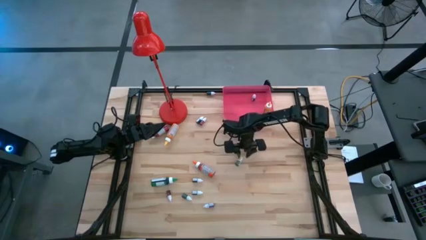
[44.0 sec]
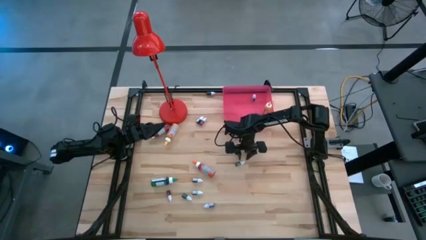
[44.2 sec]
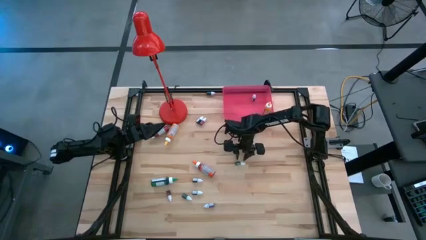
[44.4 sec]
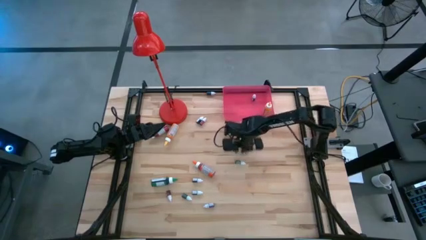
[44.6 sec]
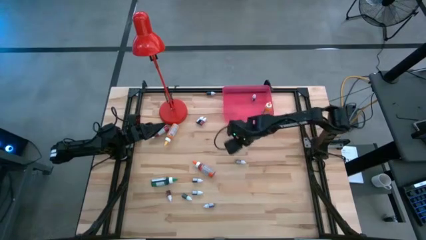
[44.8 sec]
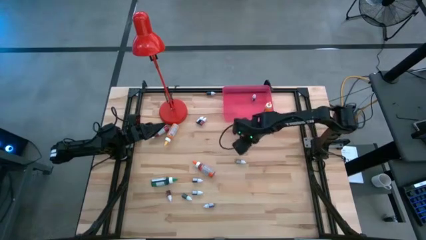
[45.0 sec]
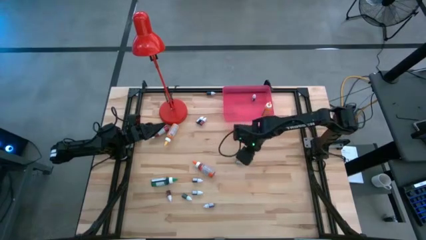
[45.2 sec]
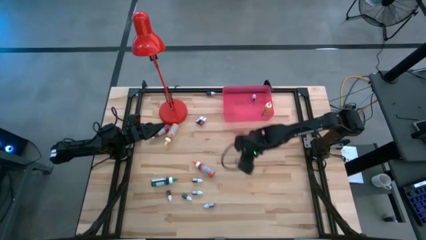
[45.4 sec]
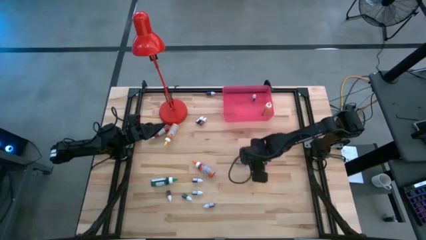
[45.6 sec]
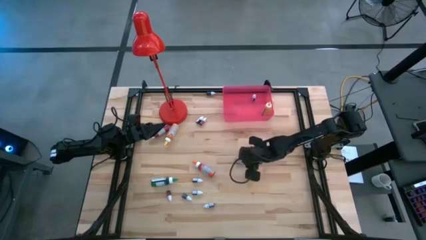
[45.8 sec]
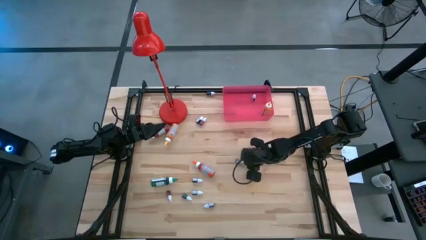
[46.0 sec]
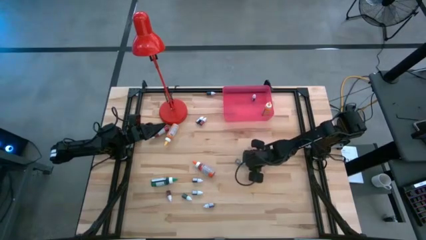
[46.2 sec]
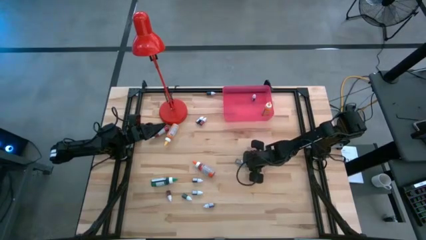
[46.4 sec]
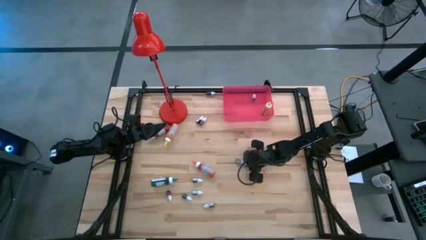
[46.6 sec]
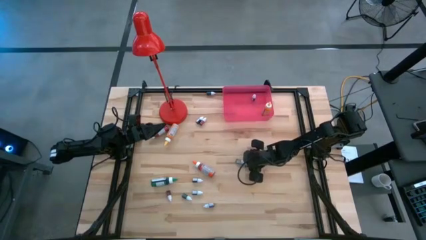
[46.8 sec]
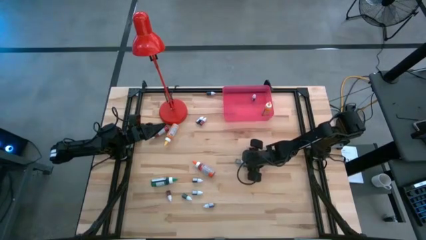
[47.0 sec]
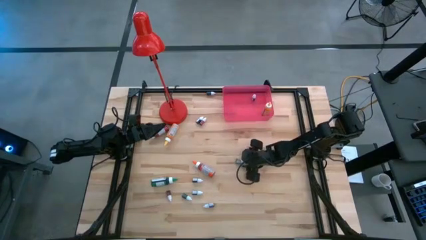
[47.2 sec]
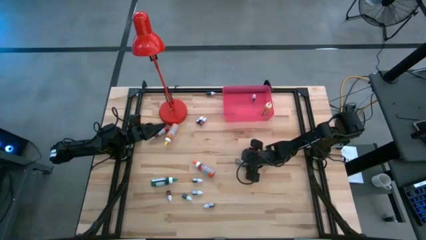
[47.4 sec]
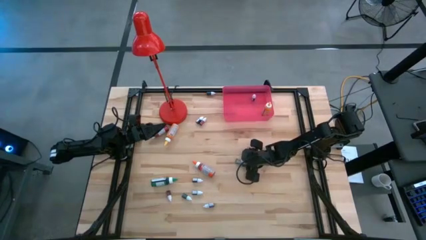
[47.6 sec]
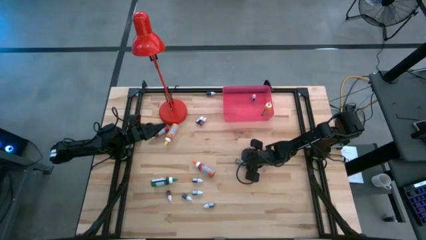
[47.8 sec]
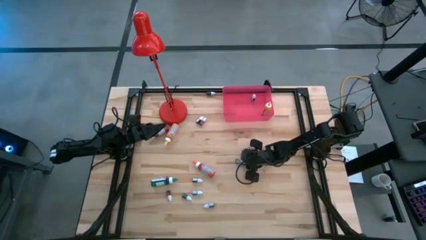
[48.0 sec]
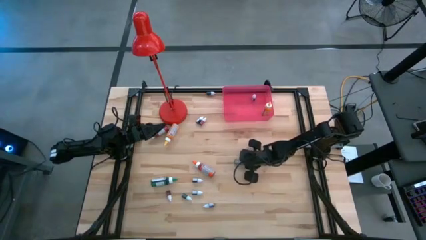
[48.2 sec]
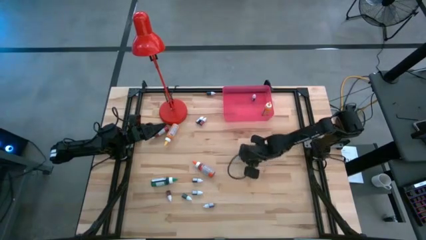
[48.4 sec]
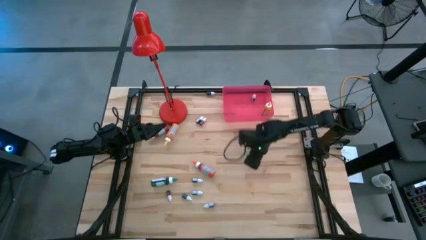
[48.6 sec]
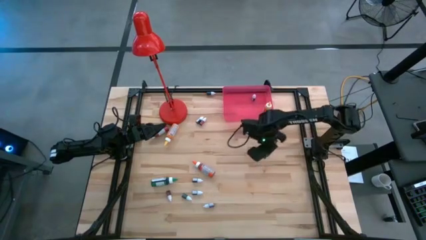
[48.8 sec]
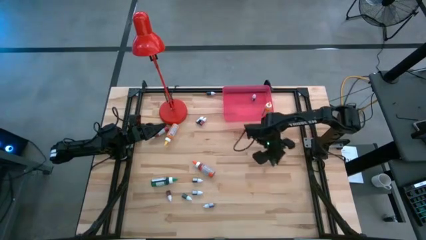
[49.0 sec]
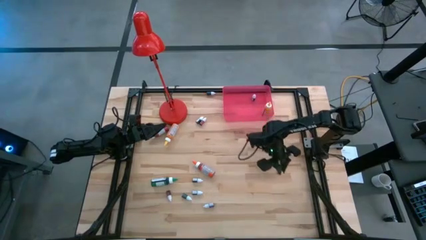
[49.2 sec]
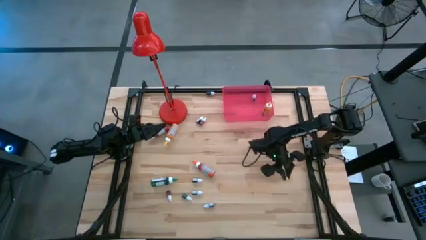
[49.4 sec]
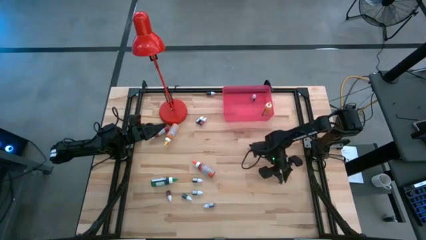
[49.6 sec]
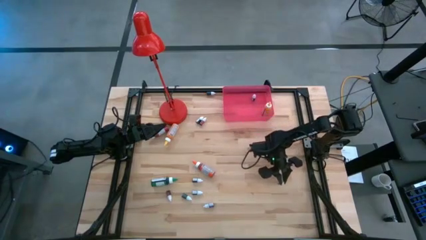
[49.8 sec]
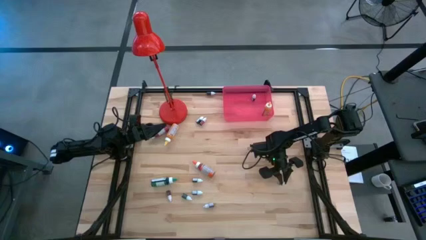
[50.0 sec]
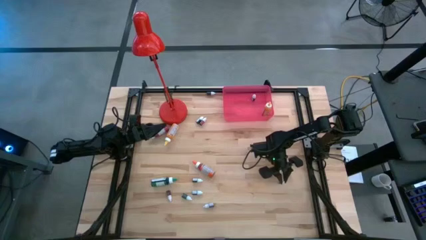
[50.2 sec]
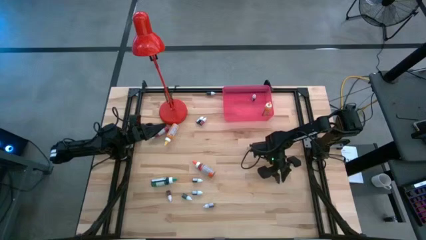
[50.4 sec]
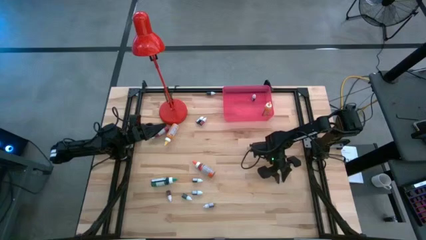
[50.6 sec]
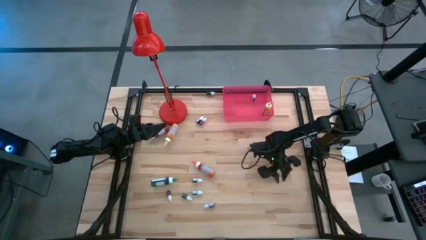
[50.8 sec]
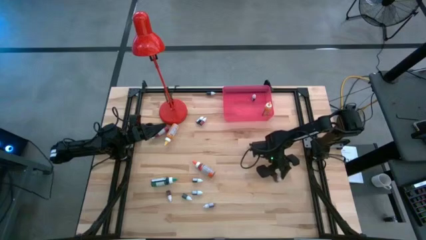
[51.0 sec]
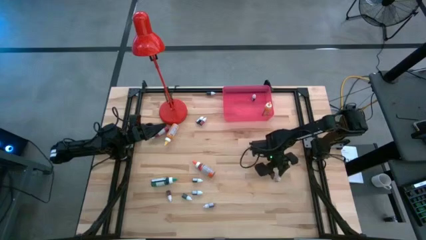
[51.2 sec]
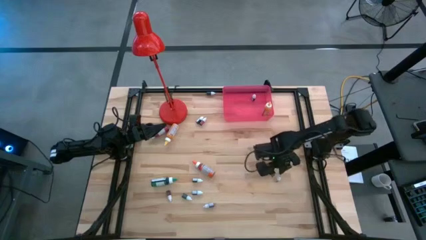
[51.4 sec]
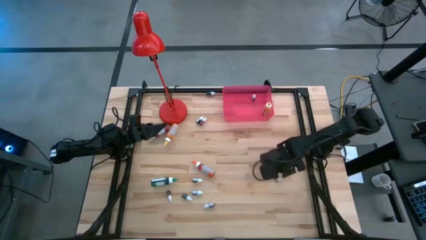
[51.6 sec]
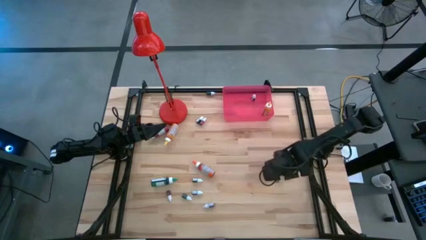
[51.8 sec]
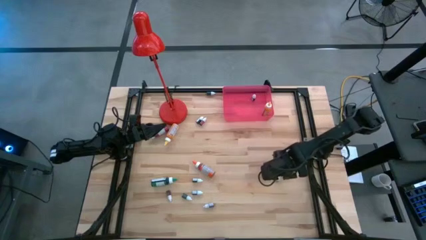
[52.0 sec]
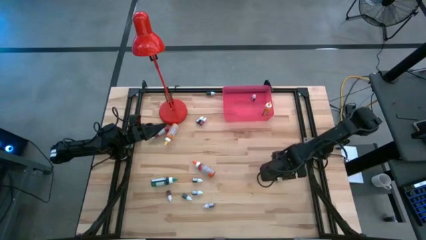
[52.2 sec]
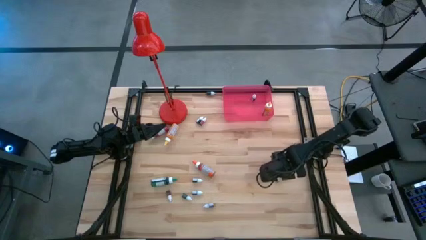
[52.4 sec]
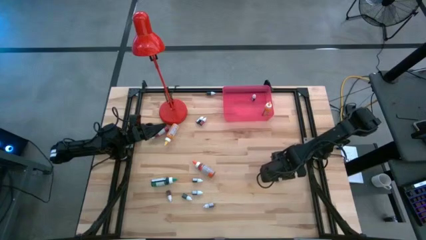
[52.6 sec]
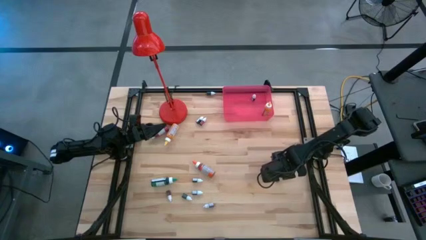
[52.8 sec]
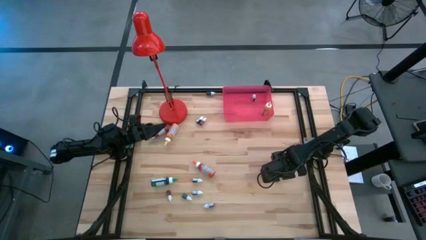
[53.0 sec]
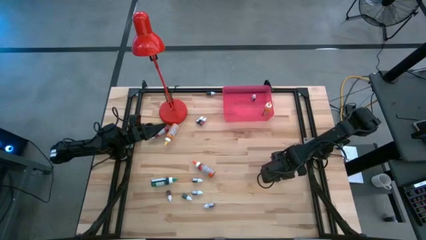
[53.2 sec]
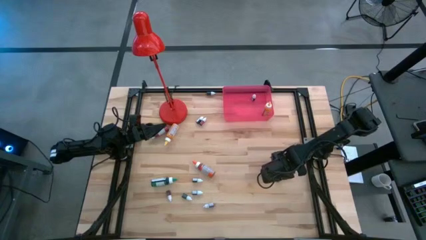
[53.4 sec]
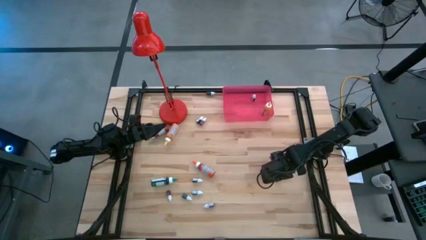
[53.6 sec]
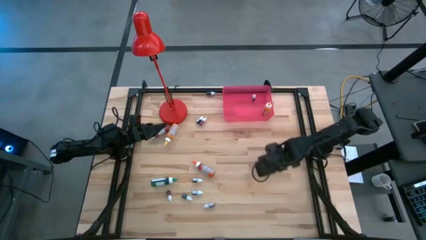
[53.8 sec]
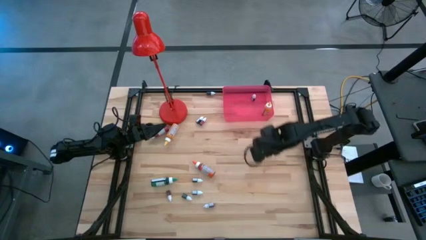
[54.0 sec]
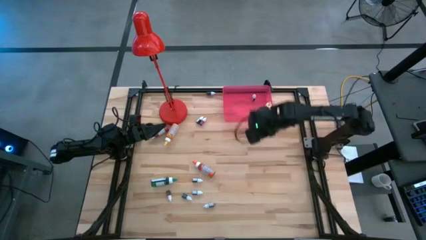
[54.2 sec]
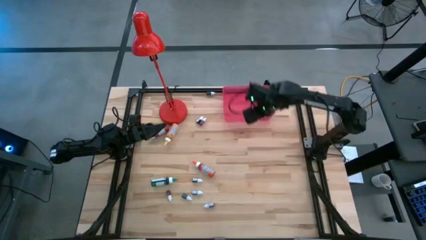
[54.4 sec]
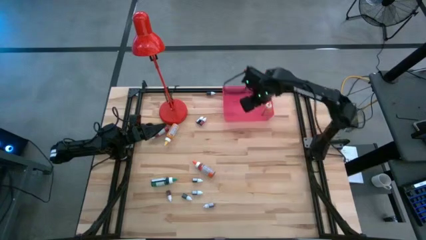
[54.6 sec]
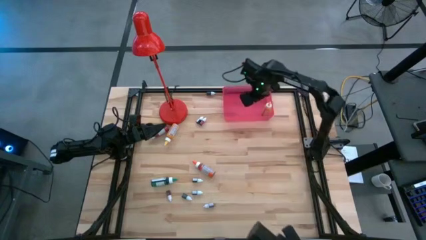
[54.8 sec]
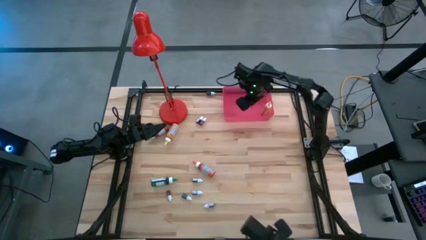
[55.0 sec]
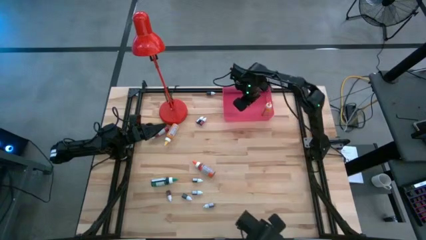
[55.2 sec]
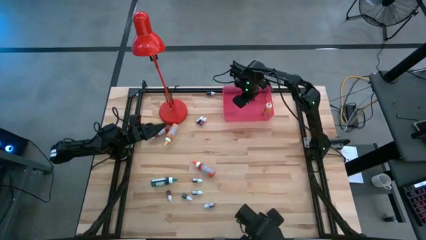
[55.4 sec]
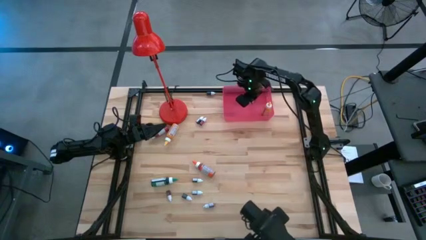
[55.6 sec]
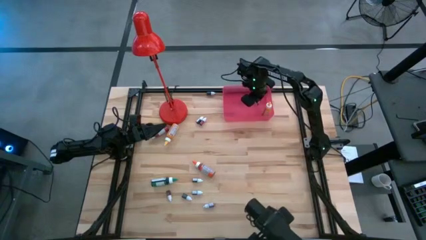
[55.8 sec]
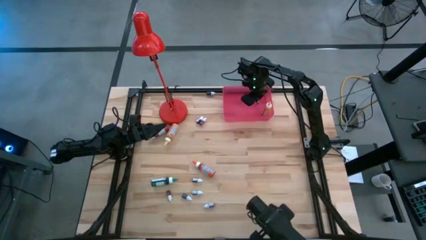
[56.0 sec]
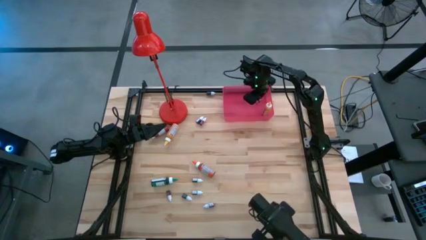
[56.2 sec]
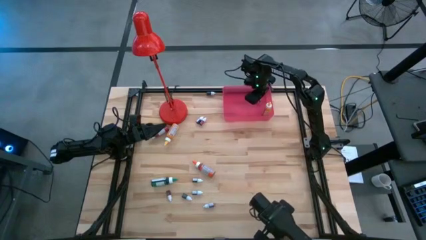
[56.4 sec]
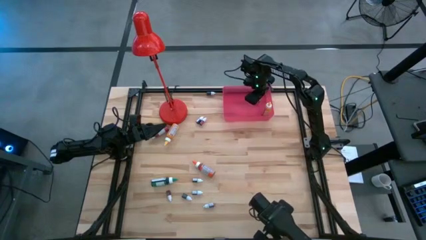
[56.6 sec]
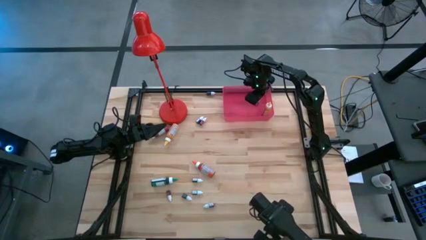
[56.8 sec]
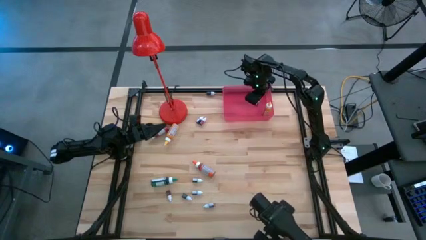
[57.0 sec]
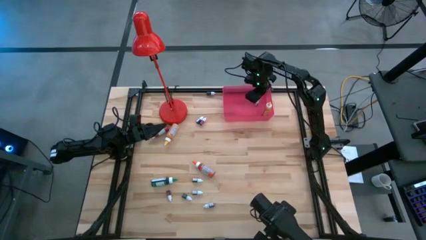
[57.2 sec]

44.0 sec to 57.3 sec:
Task: Pick & Place food coloring
Put the small green food coloring bottle into the red bin

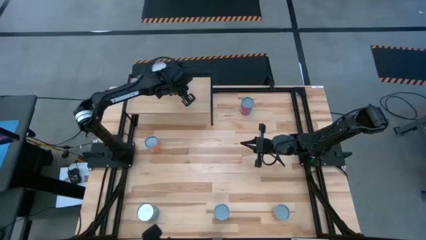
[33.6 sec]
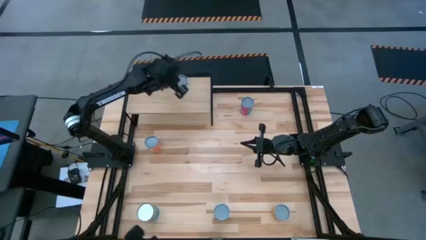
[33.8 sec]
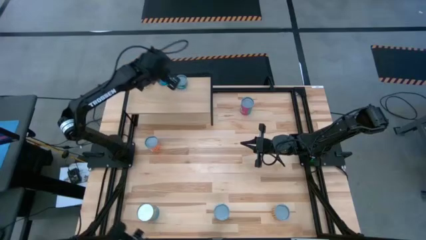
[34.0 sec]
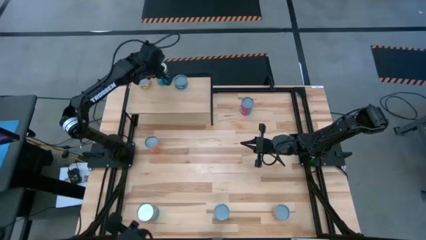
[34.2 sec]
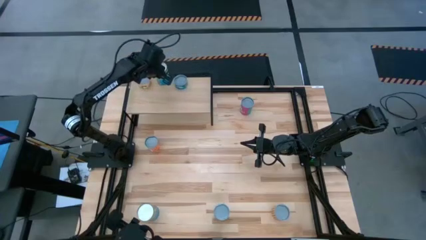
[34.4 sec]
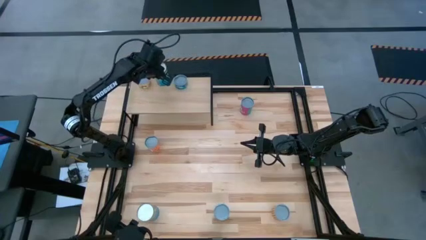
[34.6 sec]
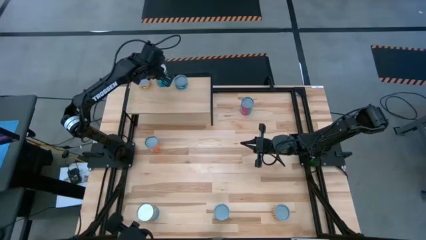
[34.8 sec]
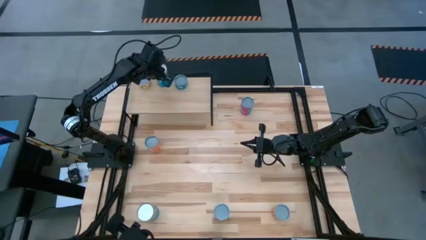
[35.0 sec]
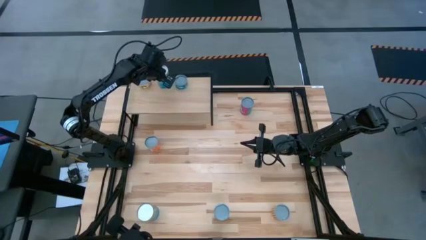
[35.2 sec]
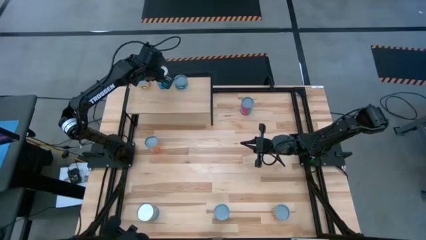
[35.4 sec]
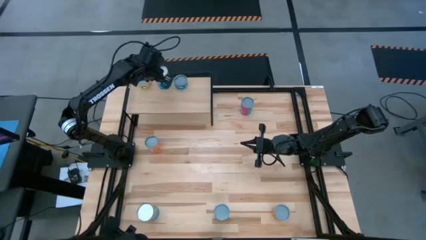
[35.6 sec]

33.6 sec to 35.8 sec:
Task: Pick and place cans onto a shelf
Adjust the canned cherries on the shelf
